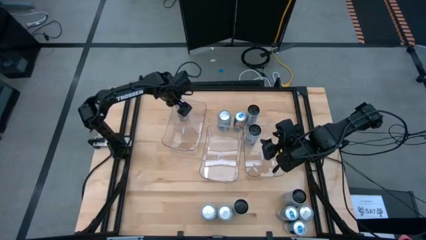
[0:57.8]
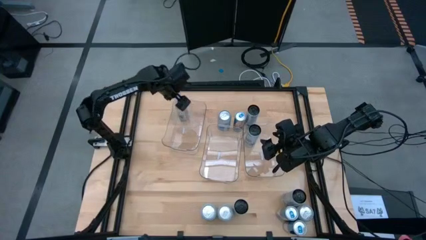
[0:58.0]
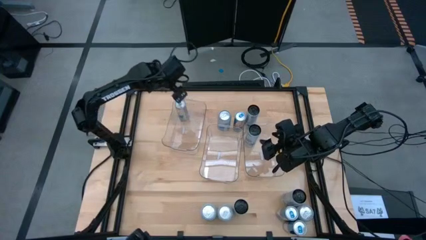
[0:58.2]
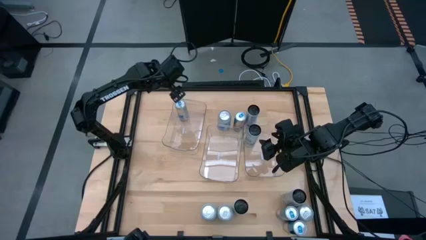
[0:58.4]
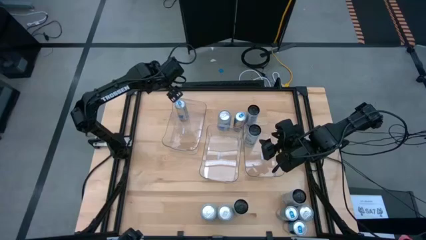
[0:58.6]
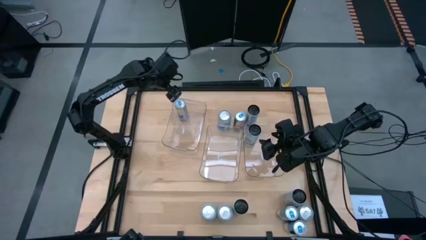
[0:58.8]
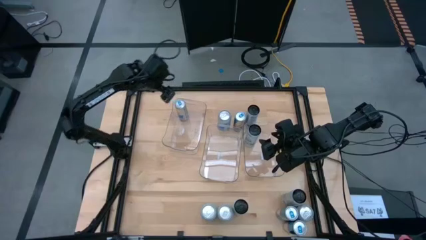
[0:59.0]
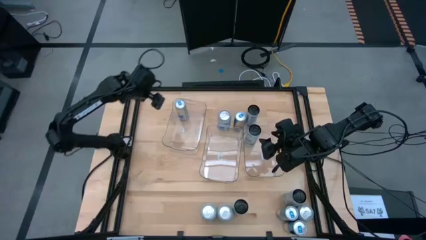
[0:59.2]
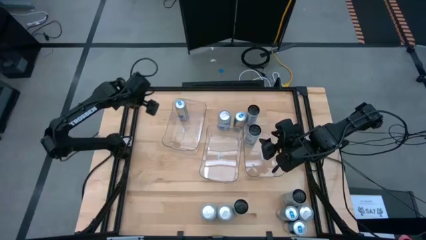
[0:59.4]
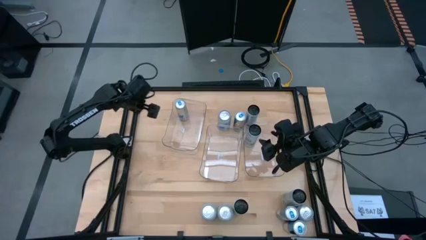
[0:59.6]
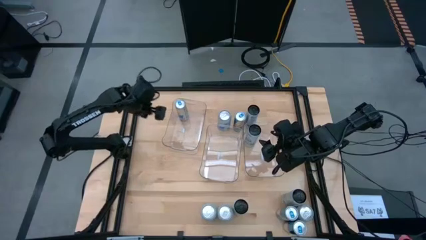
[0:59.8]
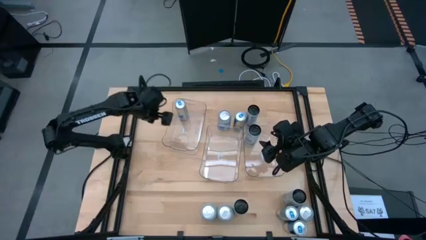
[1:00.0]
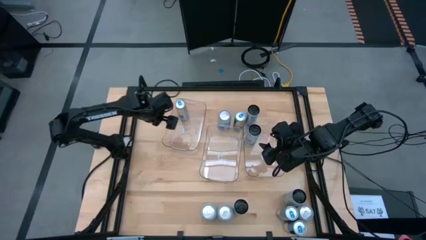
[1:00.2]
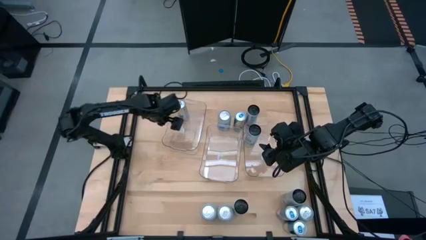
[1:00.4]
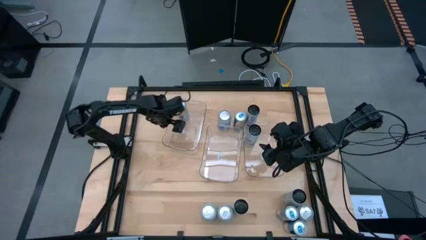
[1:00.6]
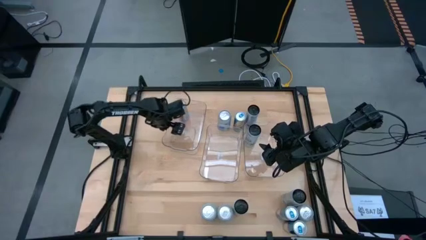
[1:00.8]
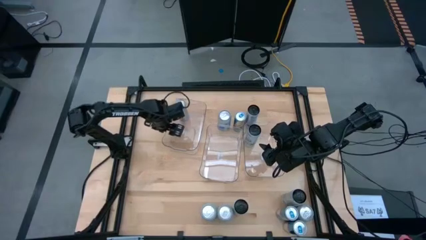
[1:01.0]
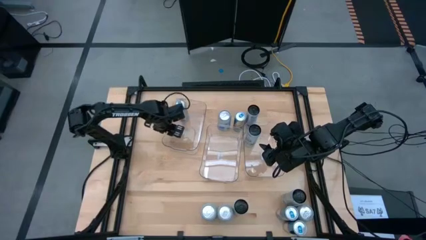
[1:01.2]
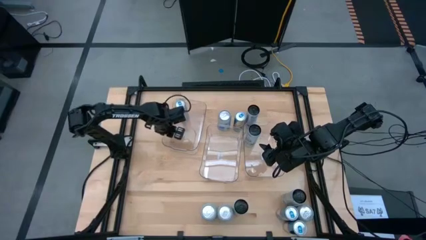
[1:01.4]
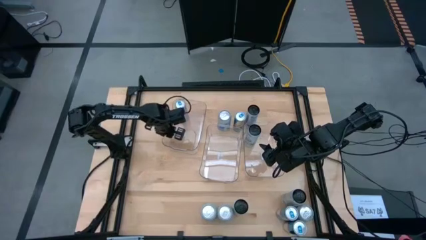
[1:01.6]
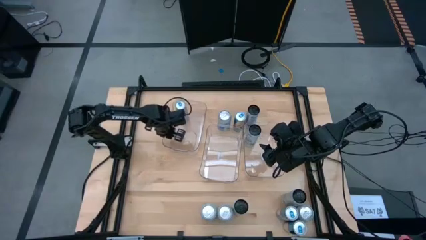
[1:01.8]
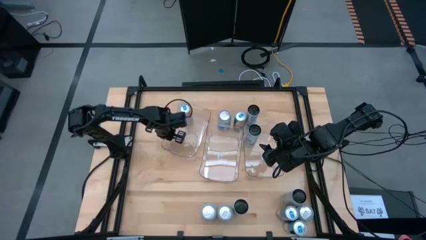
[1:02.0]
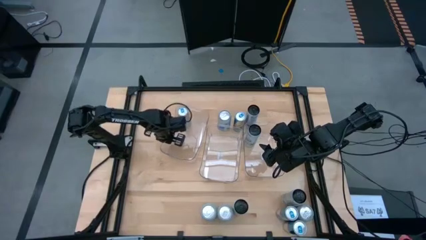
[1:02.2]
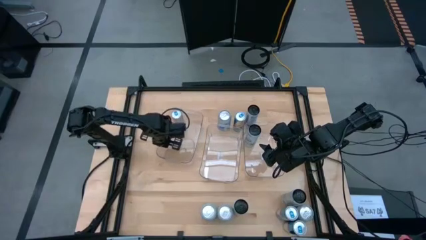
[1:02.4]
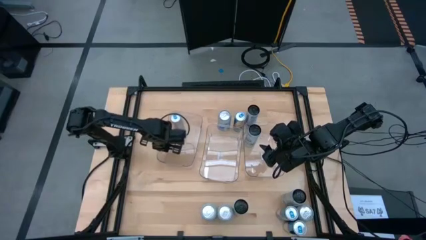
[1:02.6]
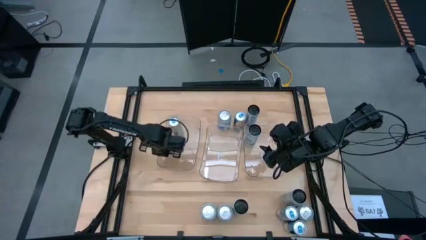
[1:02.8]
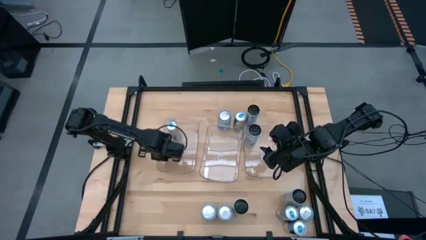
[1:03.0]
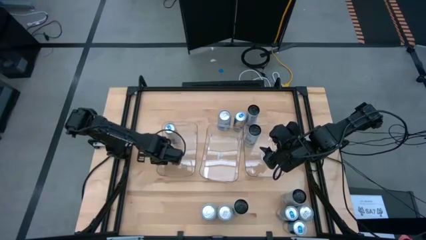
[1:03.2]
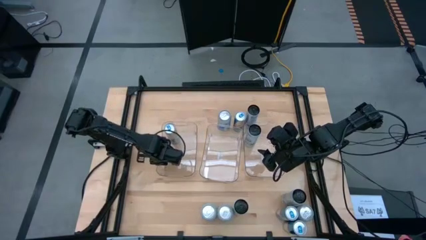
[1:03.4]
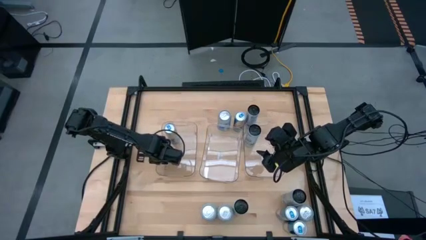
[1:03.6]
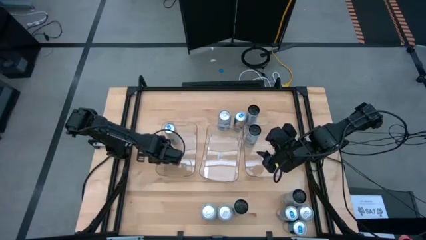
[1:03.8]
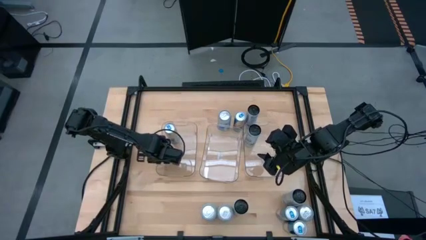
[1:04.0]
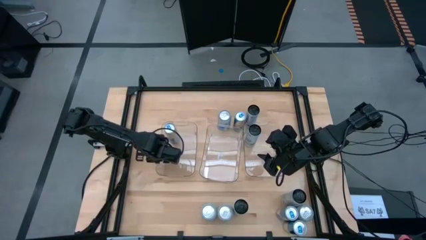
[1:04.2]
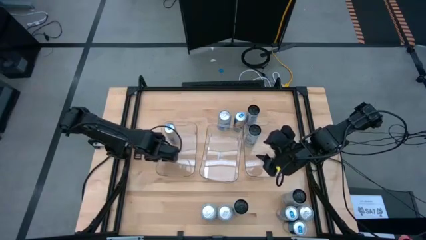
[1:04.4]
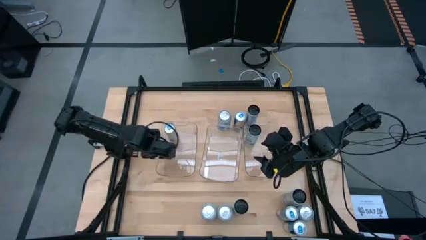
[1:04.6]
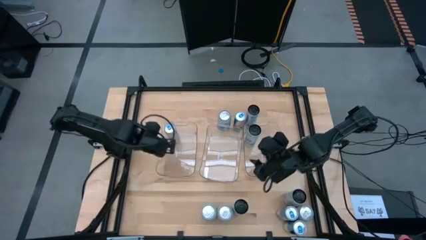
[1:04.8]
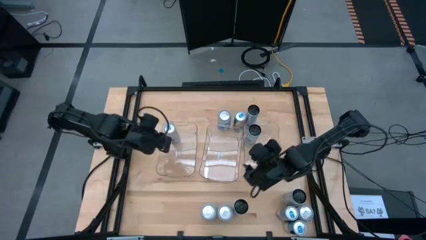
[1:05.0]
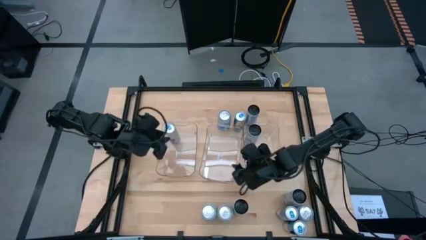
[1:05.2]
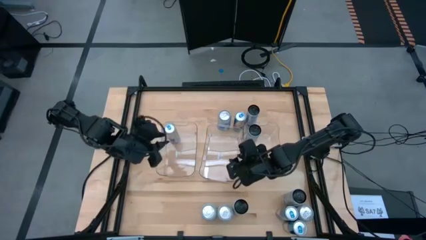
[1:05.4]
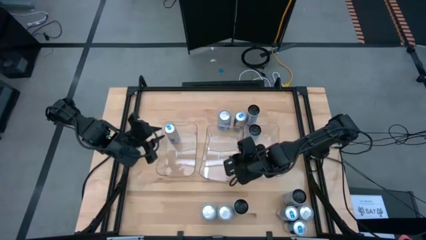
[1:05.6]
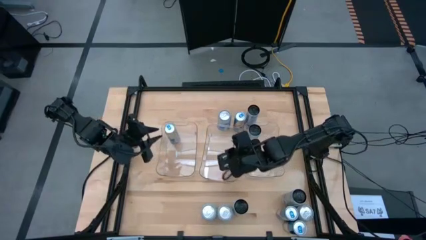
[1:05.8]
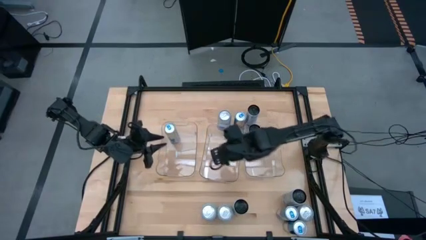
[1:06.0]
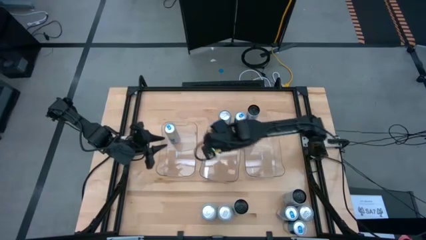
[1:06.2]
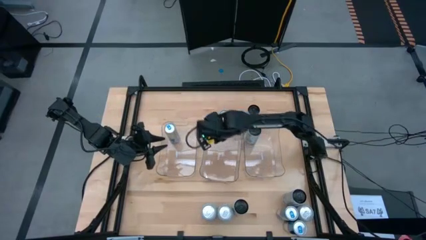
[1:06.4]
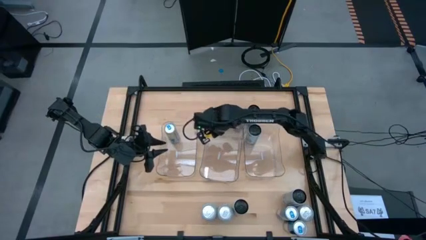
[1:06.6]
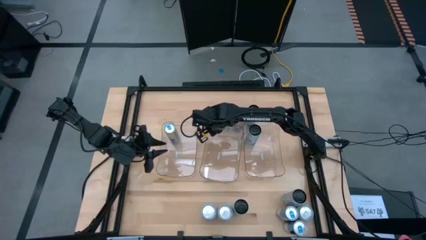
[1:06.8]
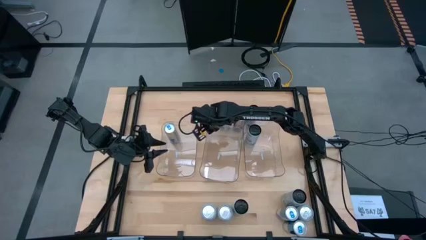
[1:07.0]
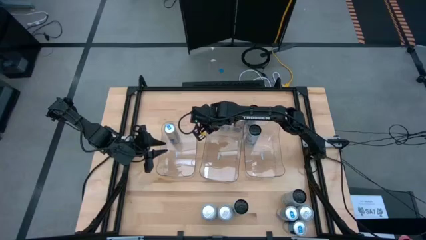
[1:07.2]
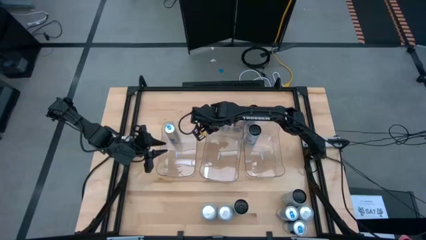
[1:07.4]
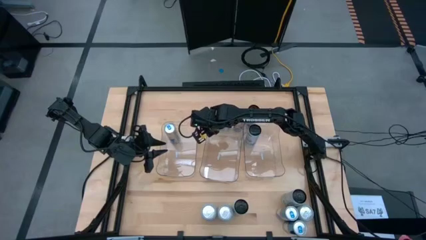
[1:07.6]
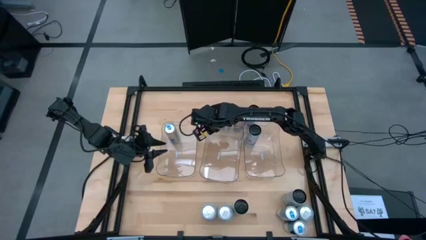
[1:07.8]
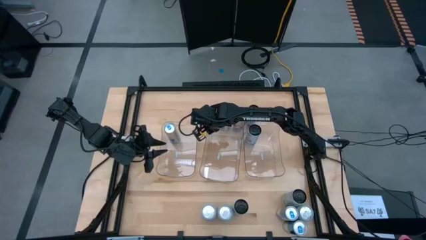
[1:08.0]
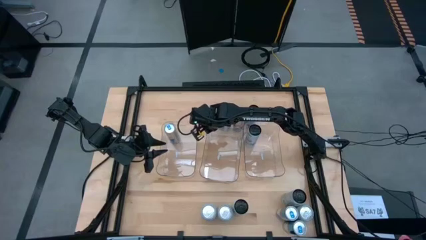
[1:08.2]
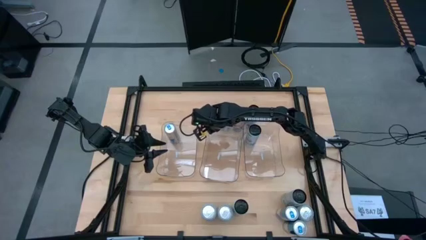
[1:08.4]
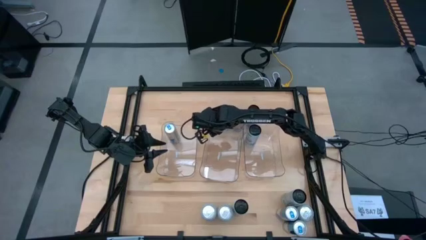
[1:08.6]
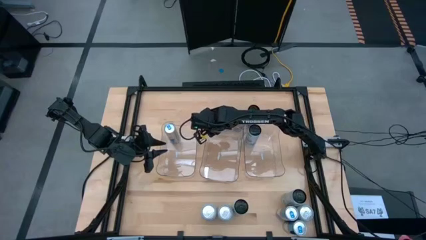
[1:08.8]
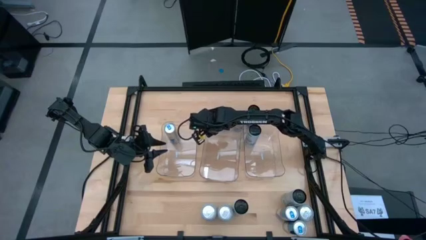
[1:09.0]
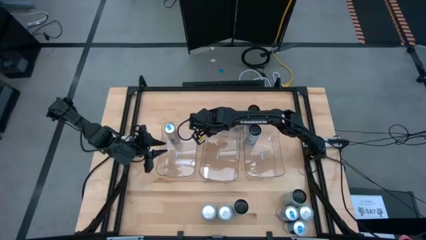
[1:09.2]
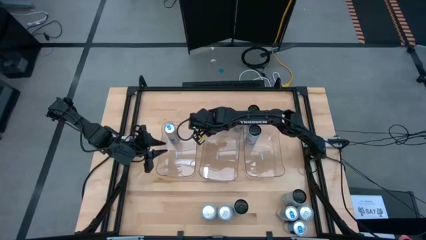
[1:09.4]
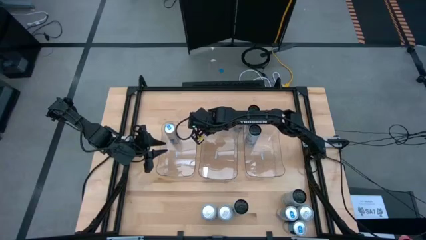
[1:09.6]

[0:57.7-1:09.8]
Task: Sort soda cans
Adjust the transparent bin to align on the table

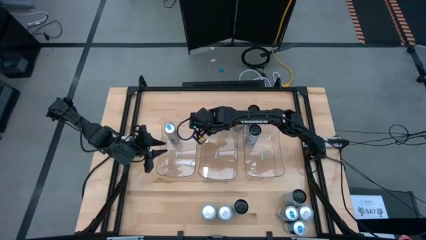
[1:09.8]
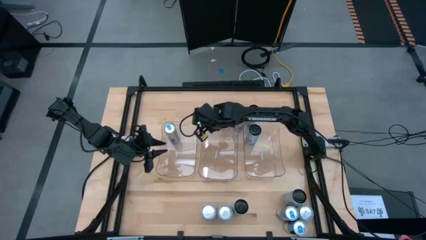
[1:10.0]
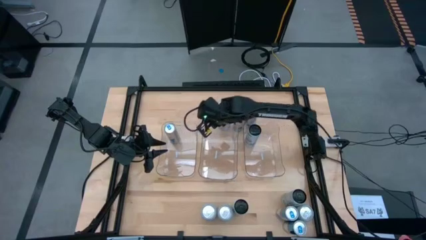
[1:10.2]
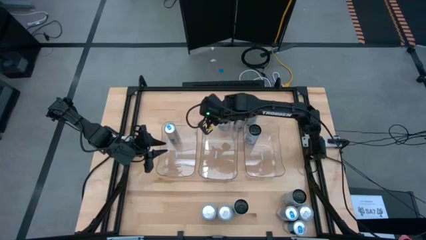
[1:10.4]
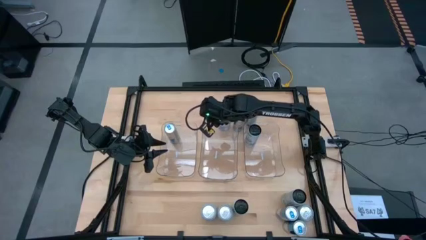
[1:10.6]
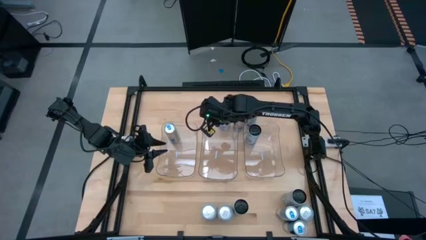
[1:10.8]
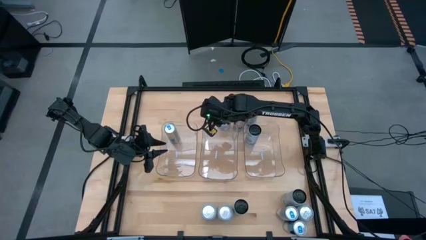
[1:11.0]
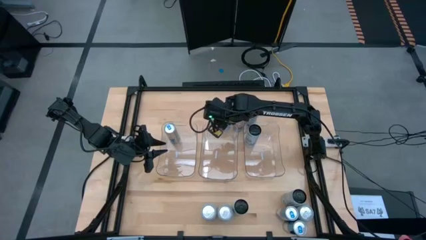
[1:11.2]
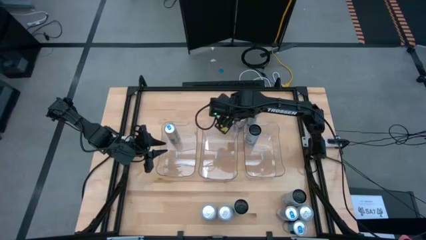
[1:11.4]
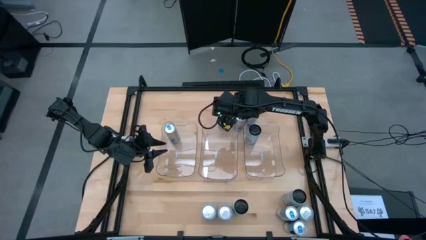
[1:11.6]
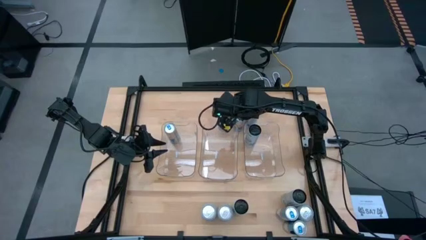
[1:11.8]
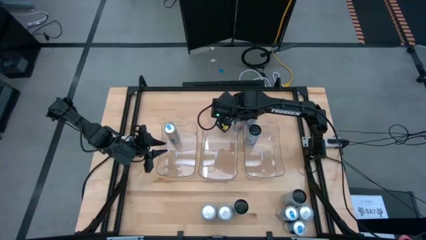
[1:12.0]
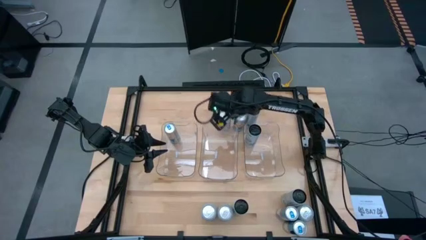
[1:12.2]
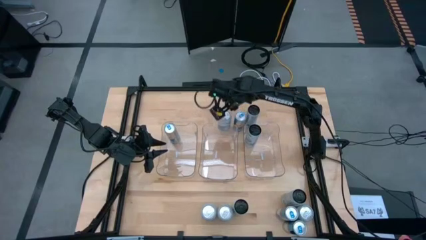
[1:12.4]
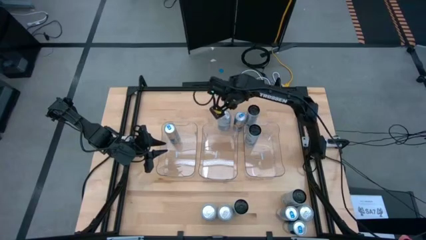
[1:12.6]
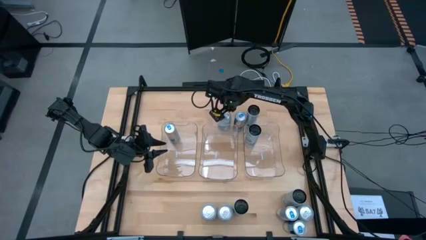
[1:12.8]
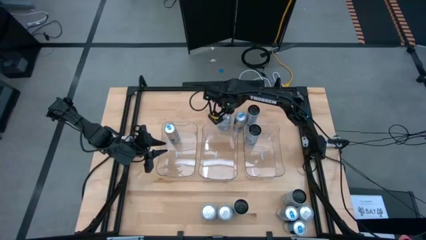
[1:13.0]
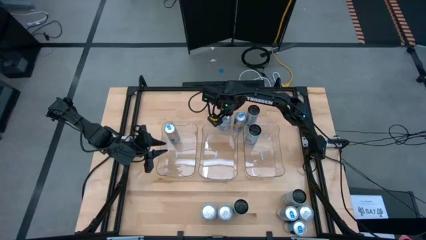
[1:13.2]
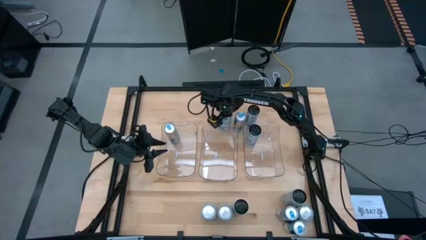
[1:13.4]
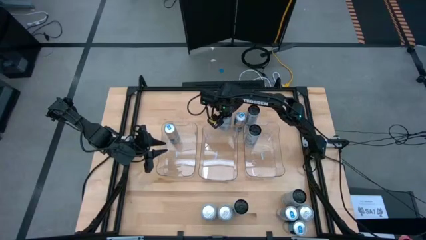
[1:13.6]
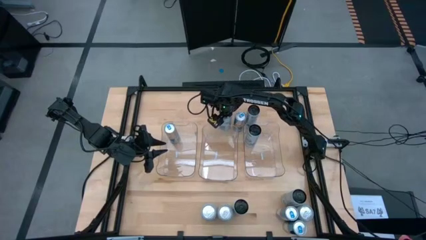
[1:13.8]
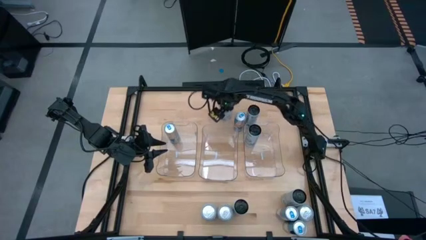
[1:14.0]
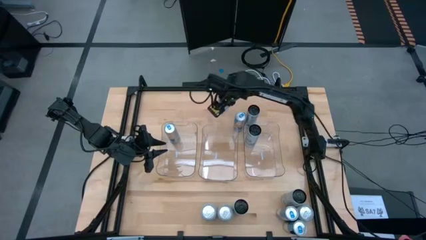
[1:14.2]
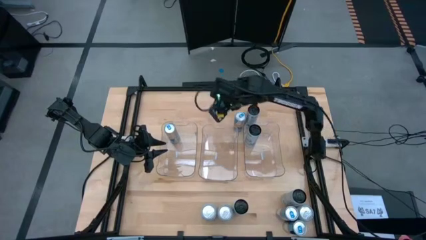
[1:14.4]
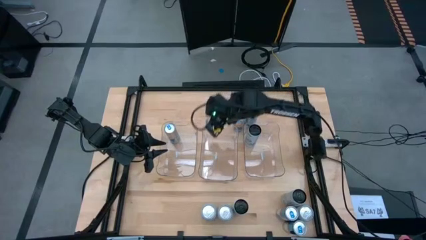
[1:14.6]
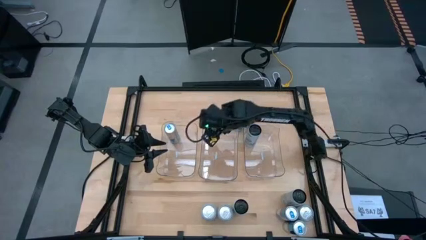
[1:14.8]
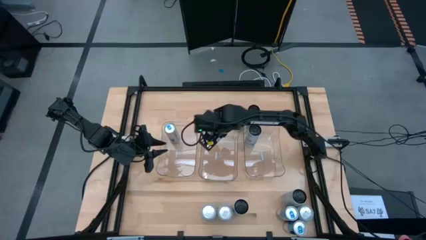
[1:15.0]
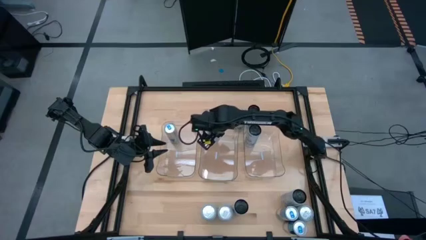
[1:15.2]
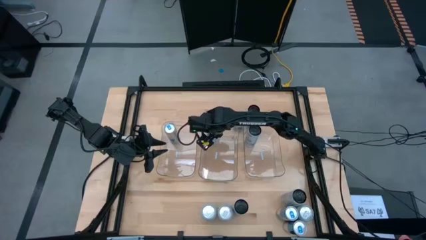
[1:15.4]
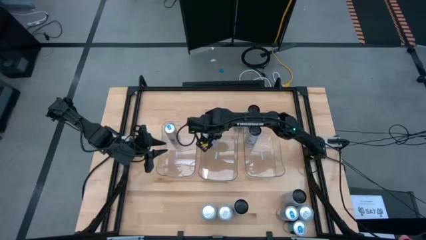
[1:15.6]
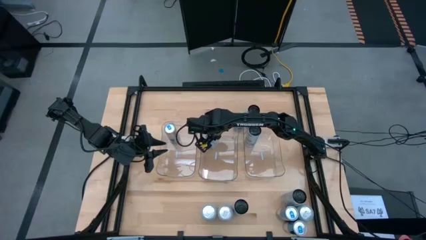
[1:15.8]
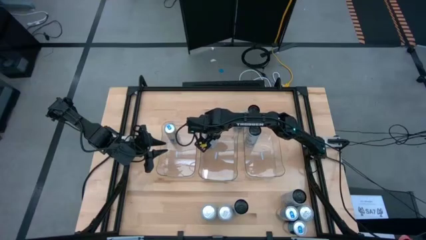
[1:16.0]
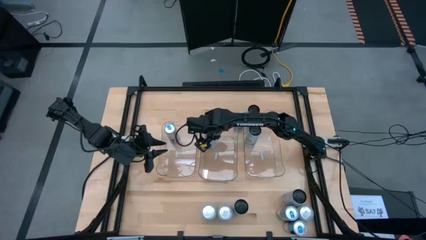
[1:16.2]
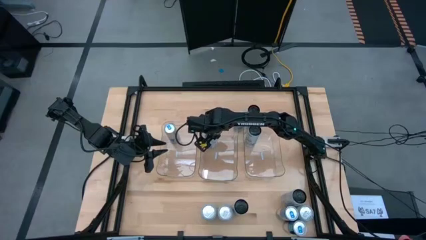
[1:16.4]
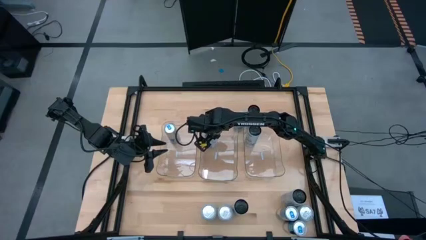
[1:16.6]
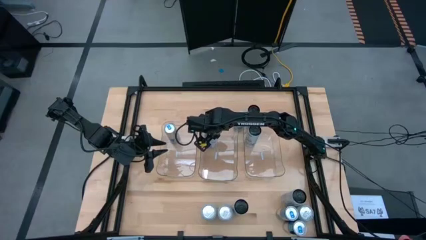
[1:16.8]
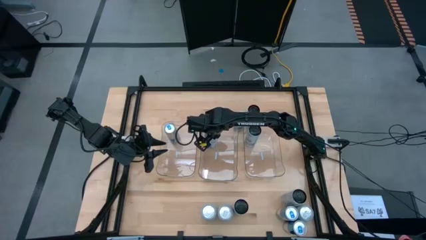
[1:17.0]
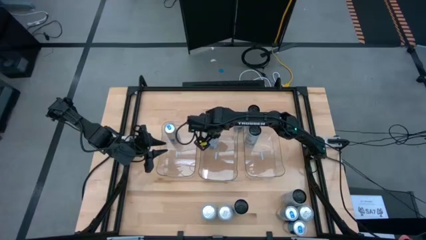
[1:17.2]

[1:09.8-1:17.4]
Put the top blue-white soda can into the middle transparent bin
